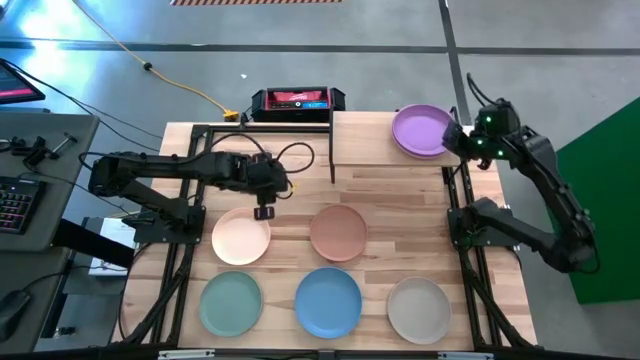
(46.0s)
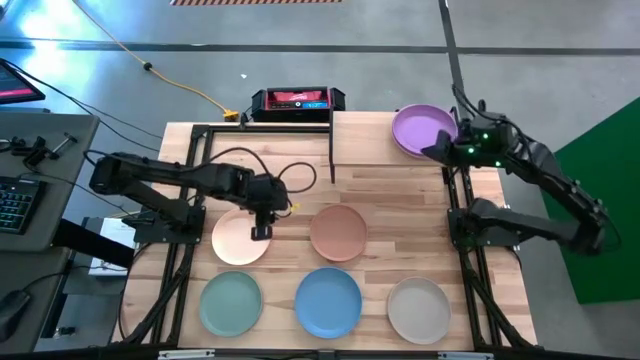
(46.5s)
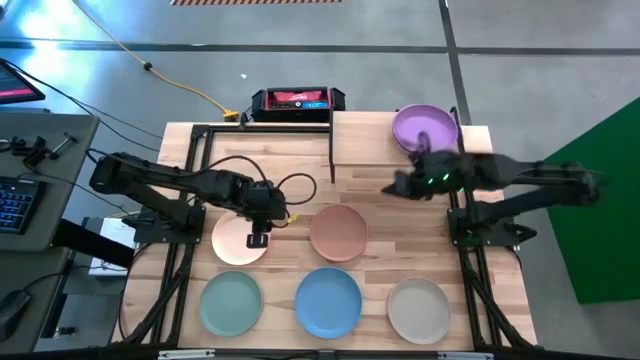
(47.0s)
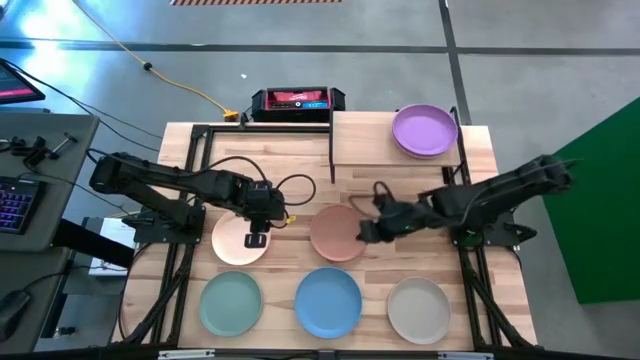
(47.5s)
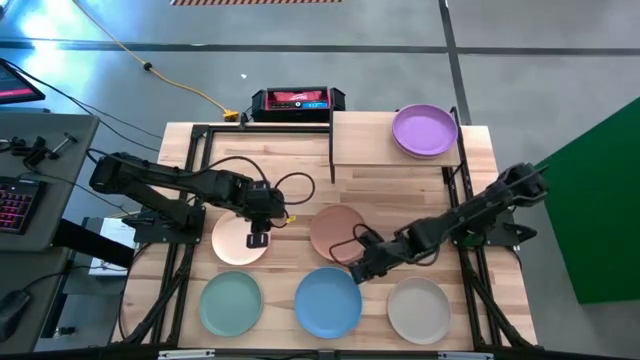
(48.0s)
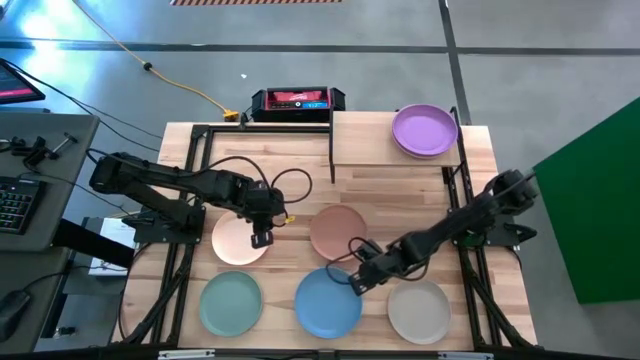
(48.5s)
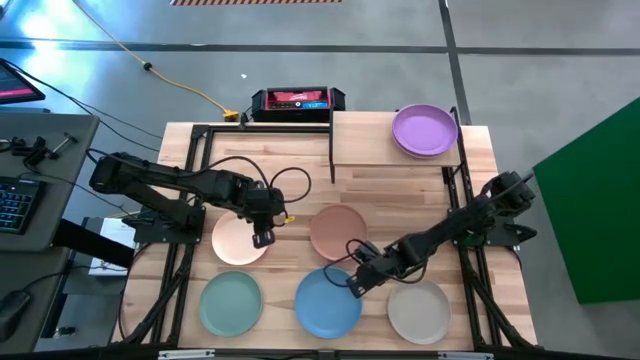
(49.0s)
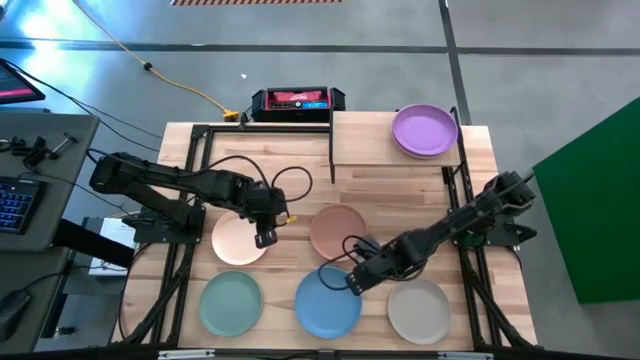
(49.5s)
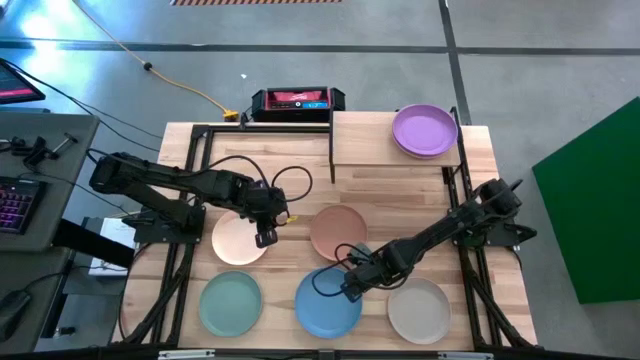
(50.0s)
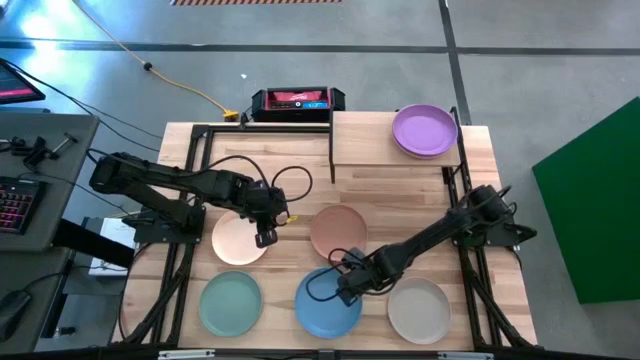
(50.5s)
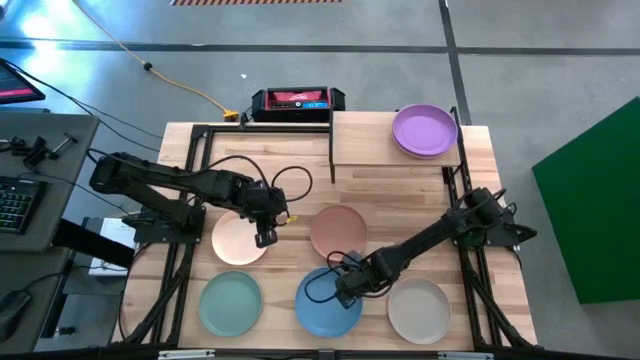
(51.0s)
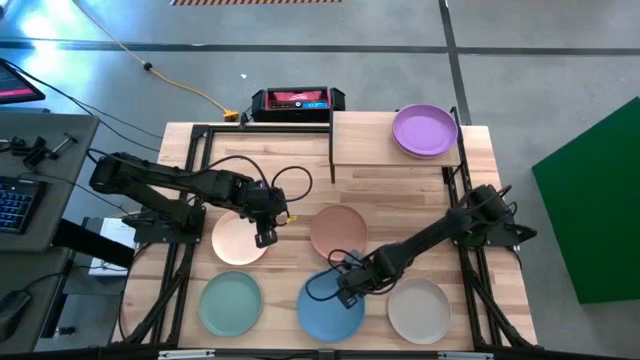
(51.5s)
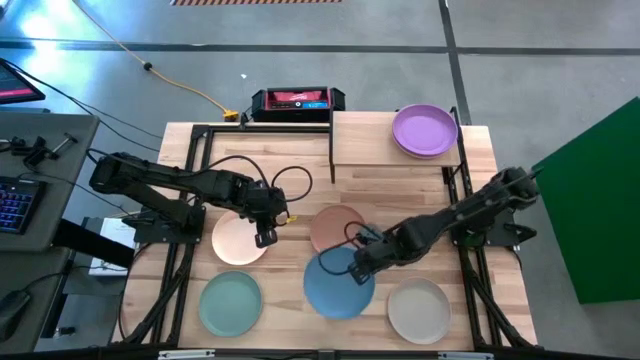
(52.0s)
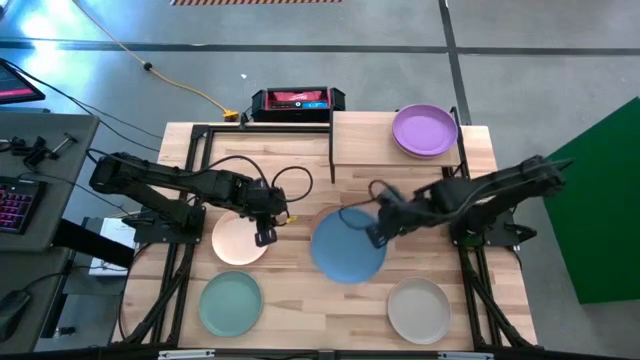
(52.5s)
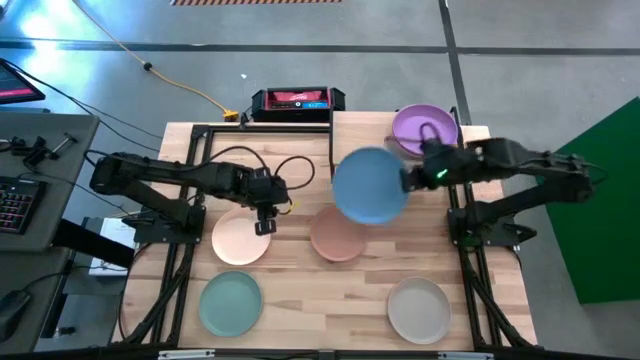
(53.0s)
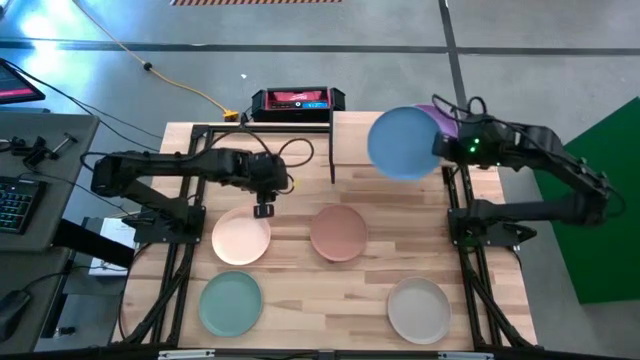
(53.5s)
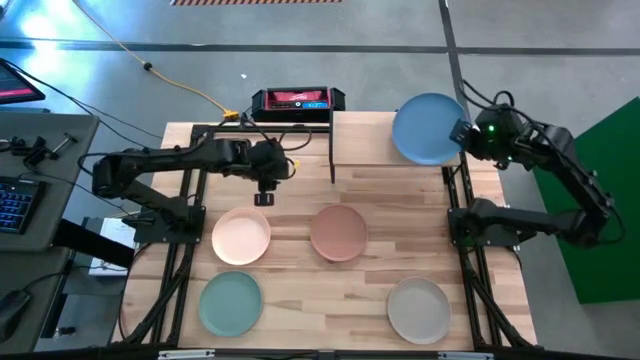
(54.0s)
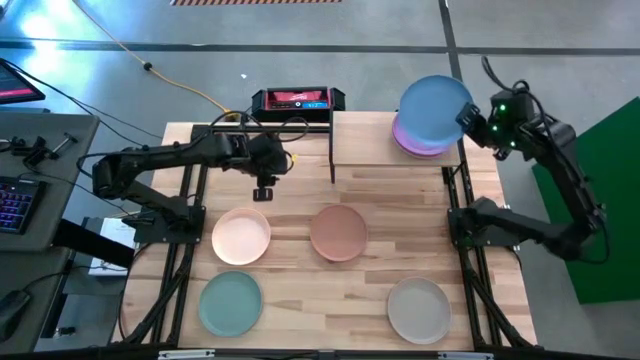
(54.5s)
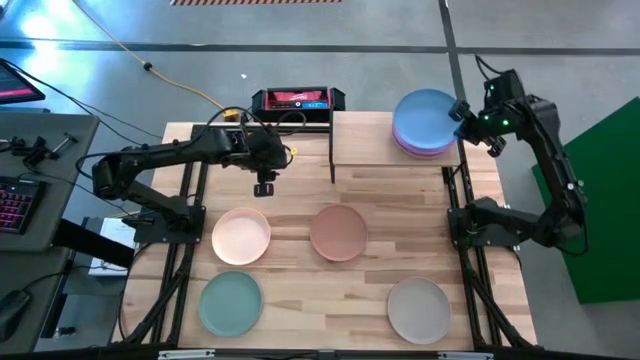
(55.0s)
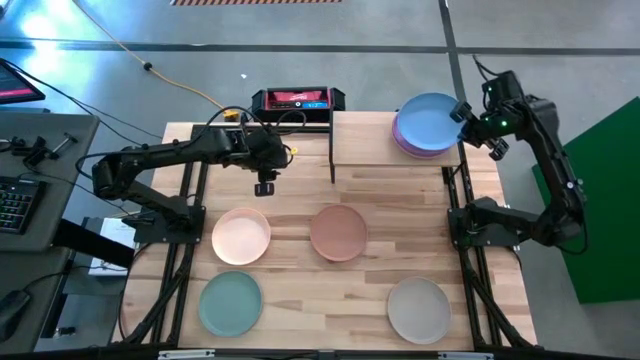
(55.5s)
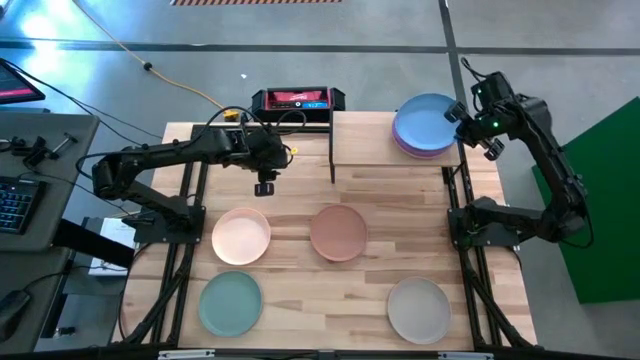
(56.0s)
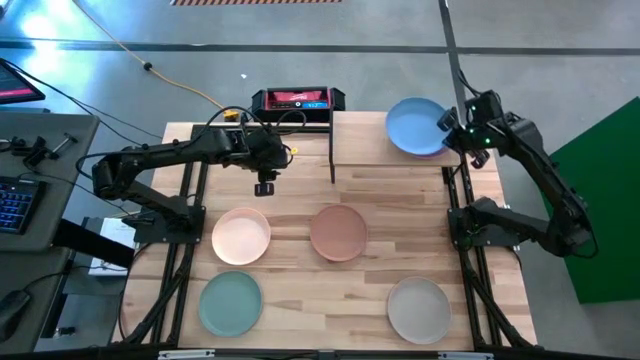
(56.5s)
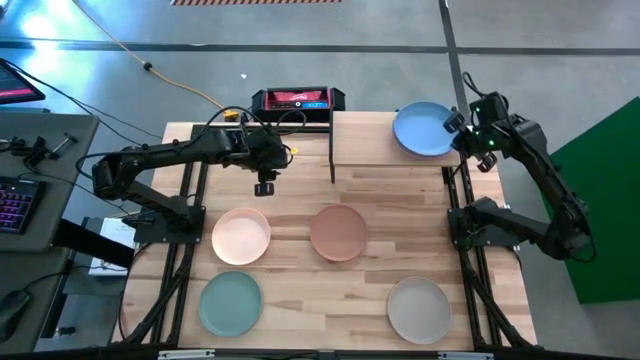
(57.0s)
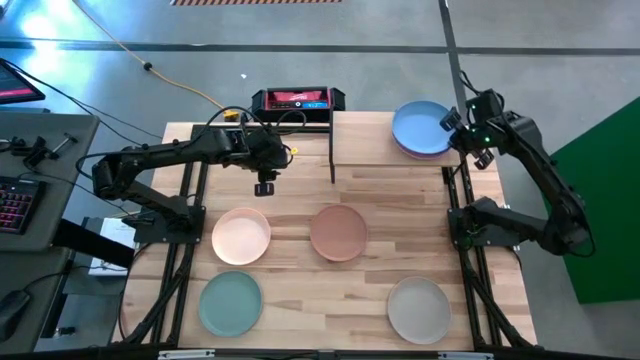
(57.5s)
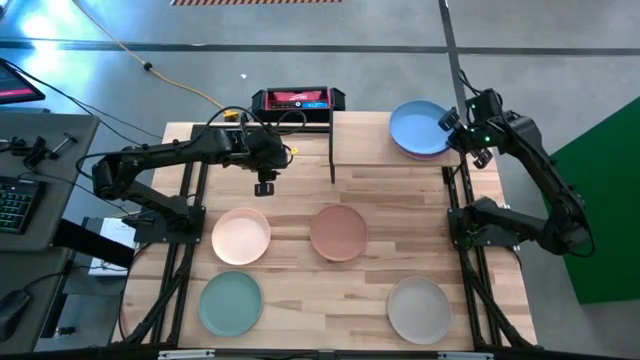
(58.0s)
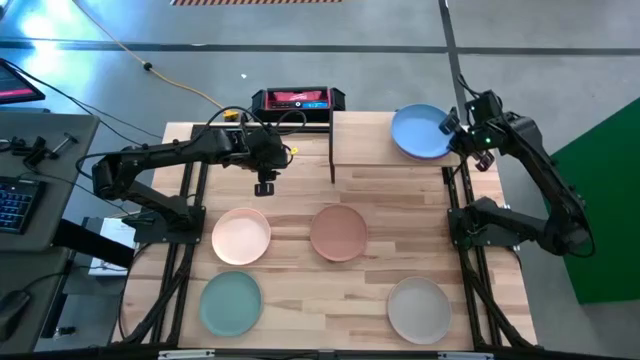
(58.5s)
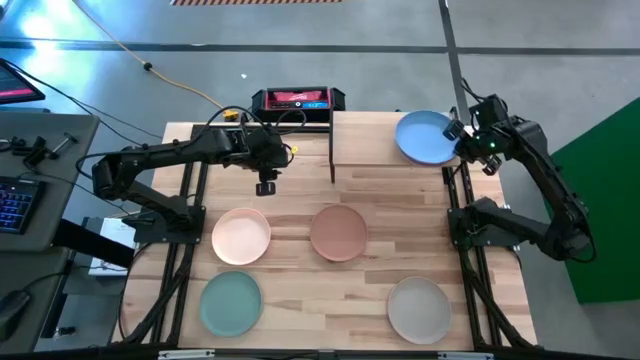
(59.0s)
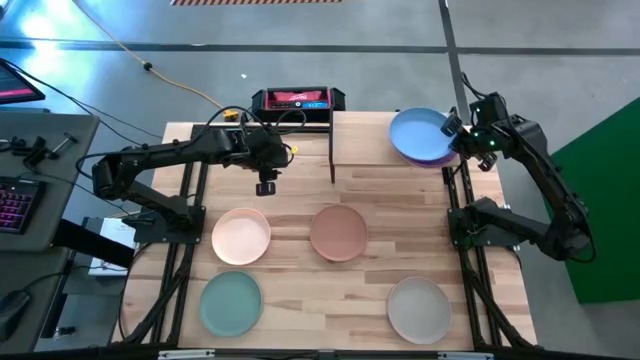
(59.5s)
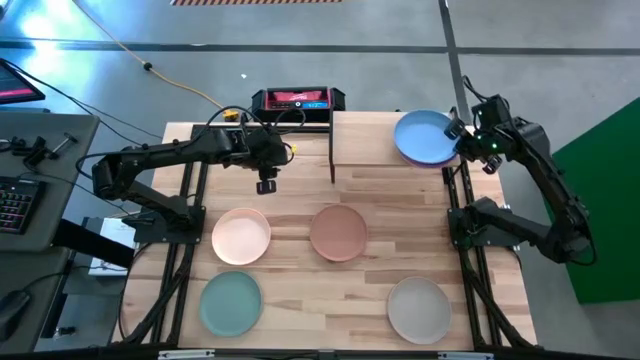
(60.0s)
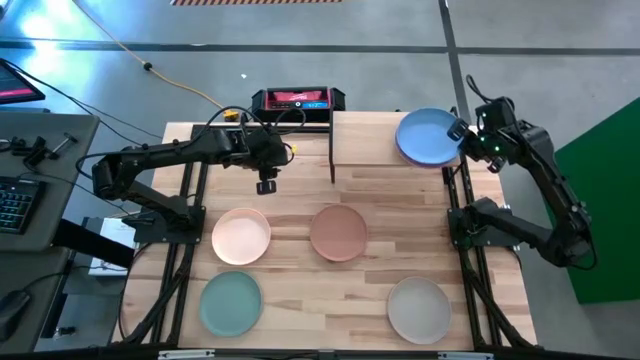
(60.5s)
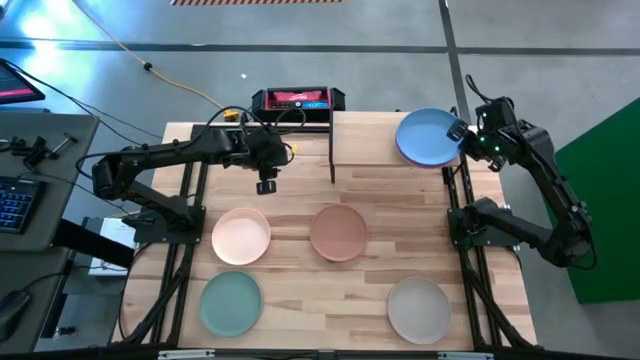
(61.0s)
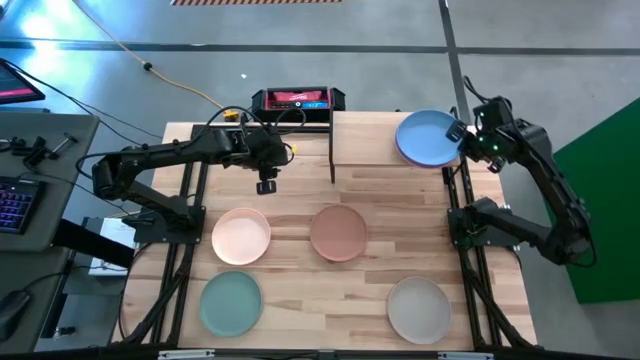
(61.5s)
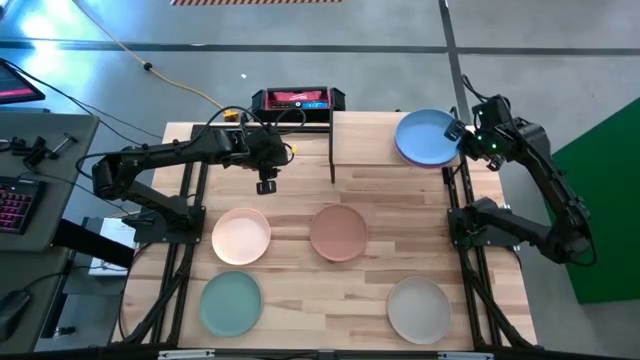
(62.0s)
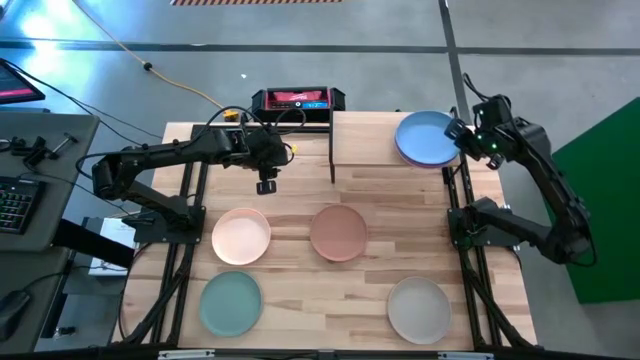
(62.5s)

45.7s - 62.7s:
Task: Place and stack plates onto a shelf
Stack the blue plate on top of the violet plate on the shelf
